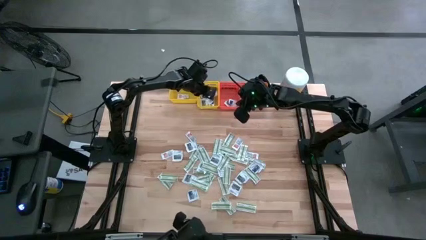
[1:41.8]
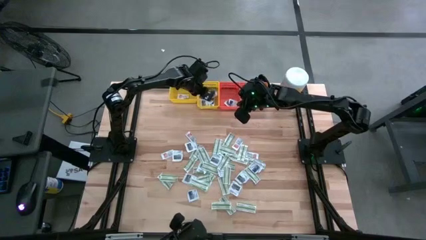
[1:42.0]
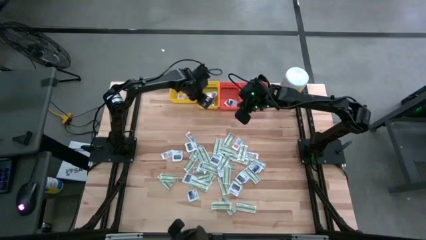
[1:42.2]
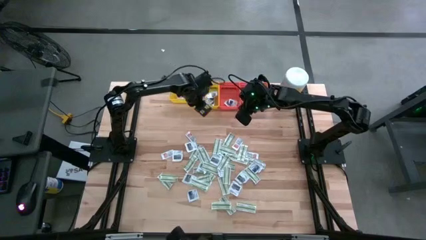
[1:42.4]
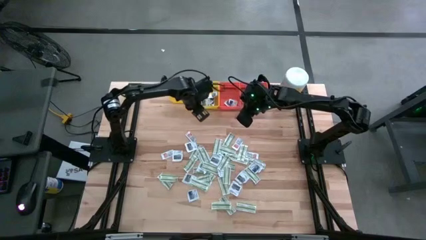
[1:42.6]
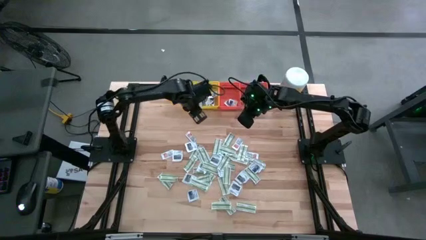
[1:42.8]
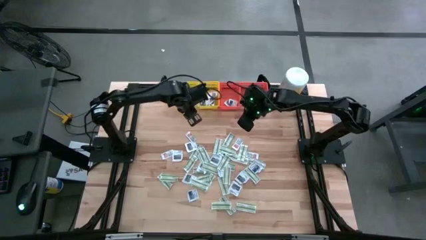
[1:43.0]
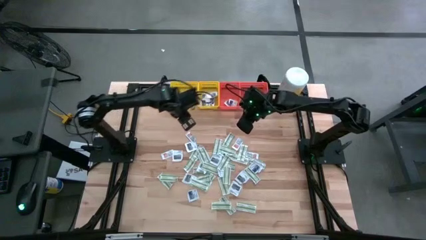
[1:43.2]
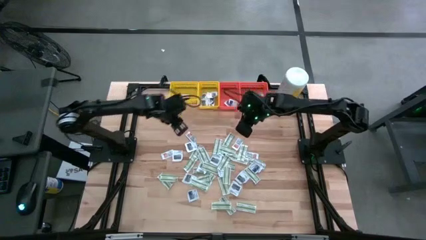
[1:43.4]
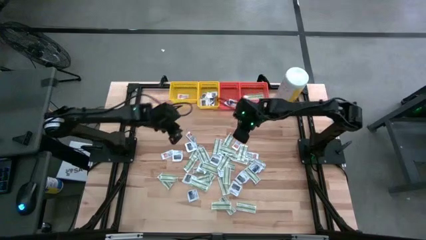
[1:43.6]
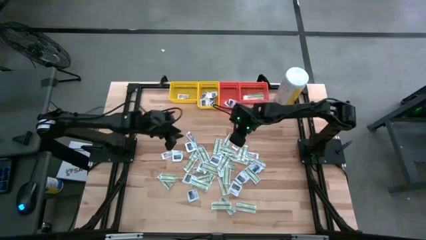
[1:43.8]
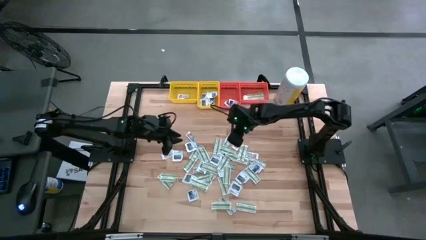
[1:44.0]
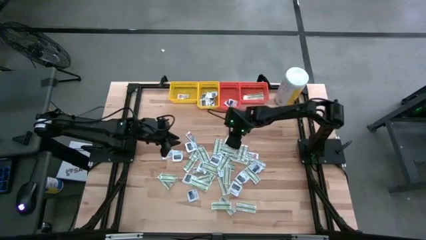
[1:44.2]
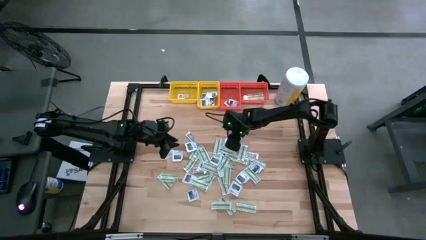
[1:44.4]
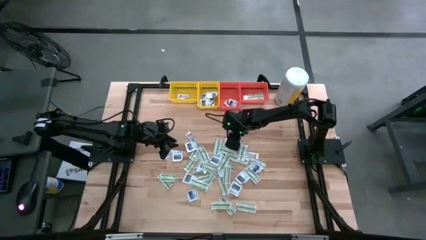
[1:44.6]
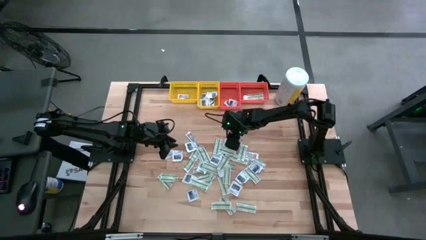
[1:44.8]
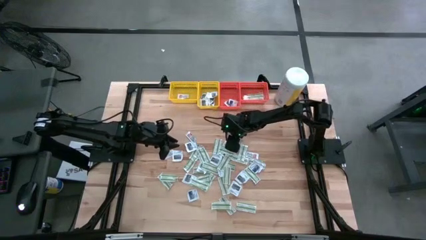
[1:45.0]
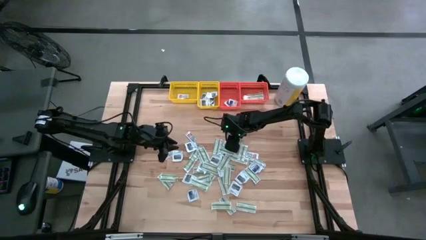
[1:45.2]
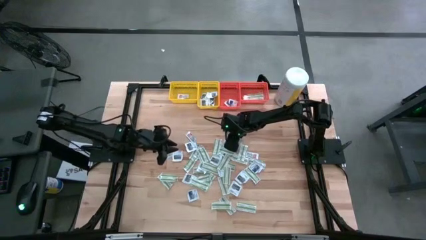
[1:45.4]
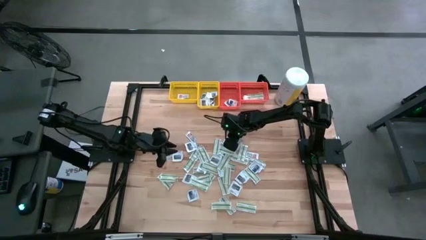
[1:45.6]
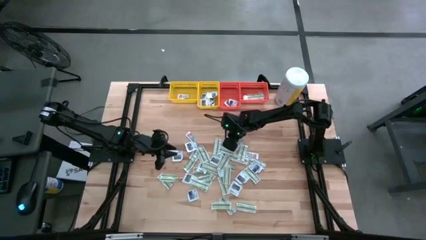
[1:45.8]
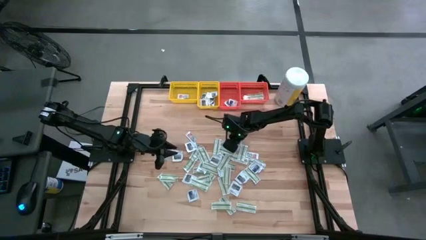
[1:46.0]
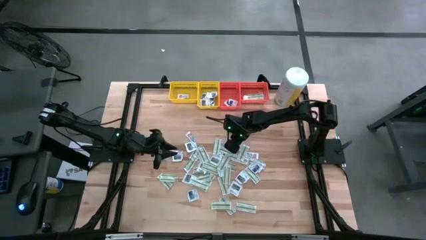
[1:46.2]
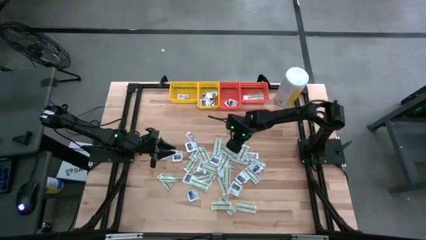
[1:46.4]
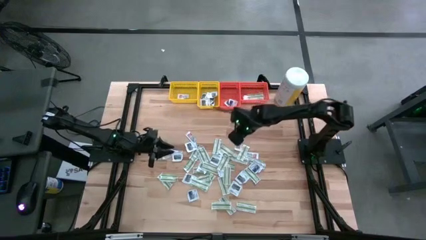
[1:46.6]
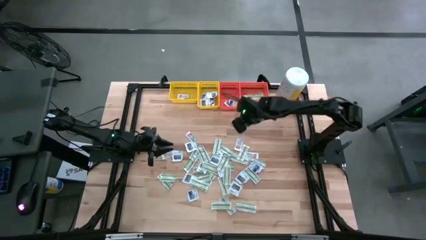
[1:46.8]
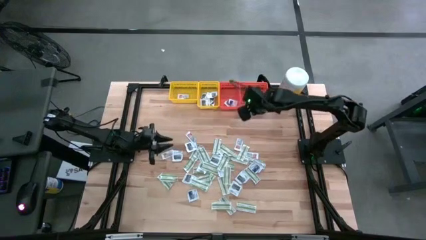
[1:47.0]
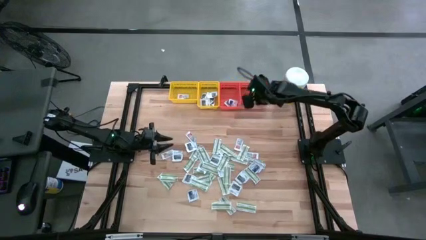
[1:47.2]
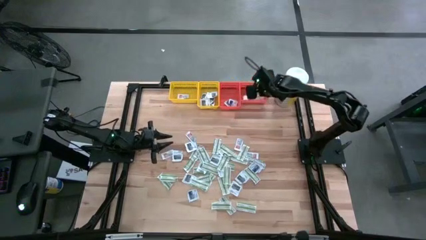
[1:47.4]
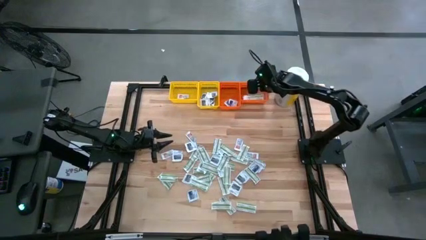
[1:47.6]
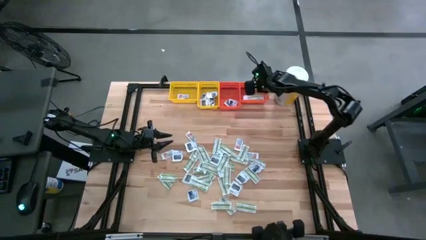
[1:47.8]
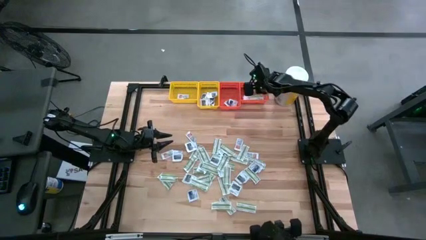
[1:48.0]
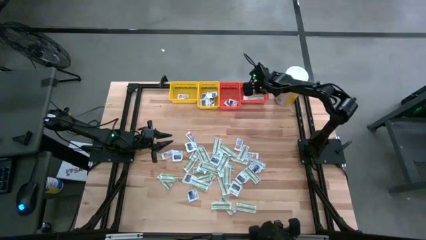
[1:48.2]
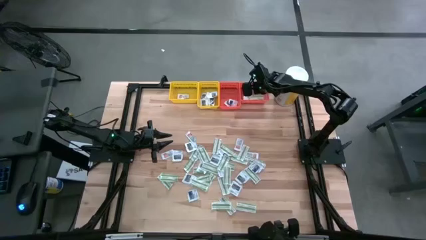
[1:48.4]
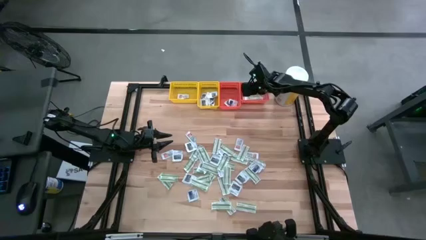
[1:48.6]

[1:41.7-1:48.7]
Task: Pick & Place First Aid Supplies
Put the green pad into the right orange bin

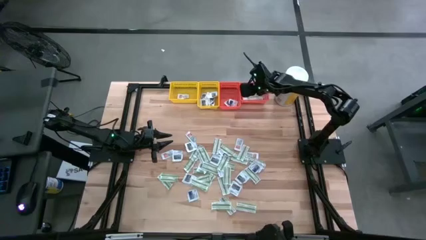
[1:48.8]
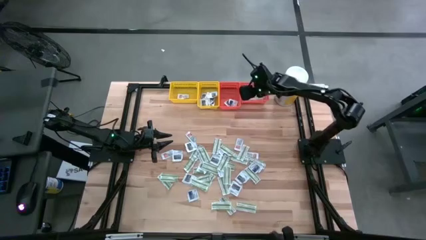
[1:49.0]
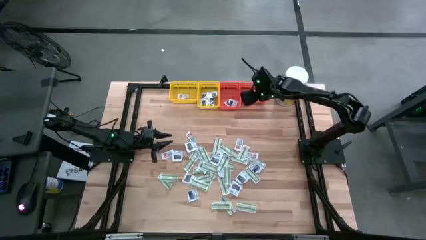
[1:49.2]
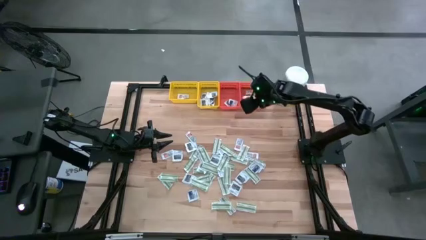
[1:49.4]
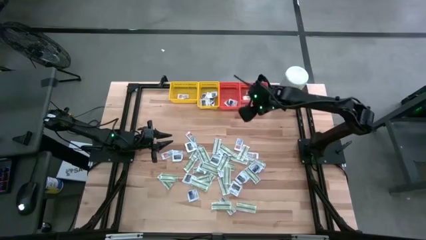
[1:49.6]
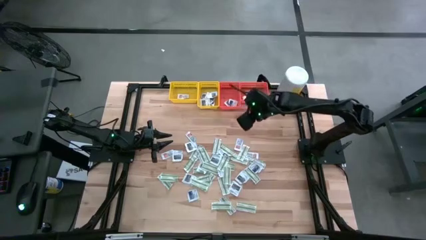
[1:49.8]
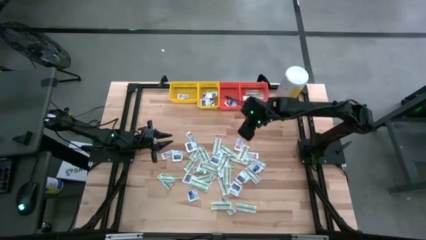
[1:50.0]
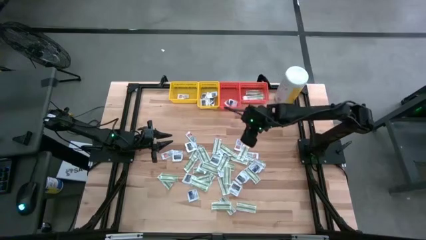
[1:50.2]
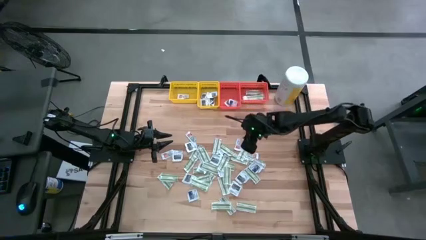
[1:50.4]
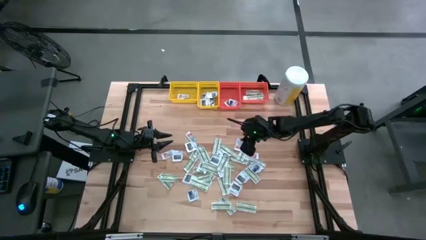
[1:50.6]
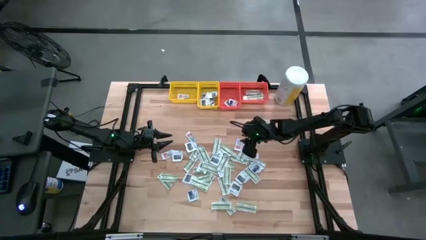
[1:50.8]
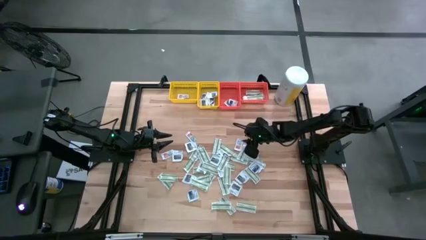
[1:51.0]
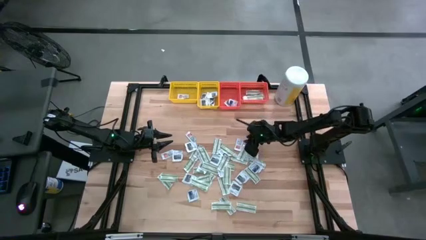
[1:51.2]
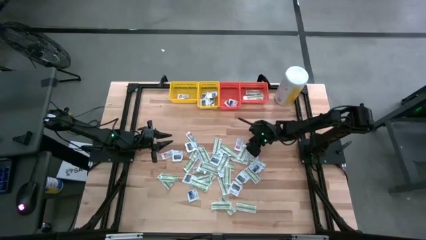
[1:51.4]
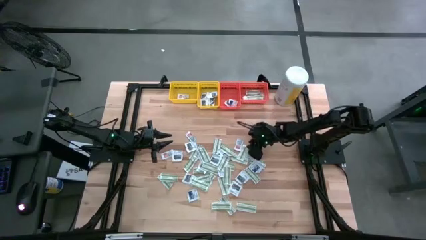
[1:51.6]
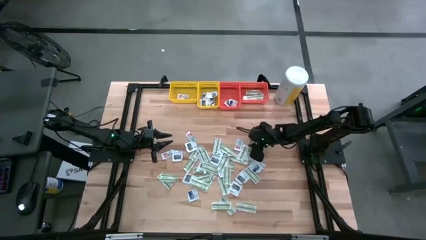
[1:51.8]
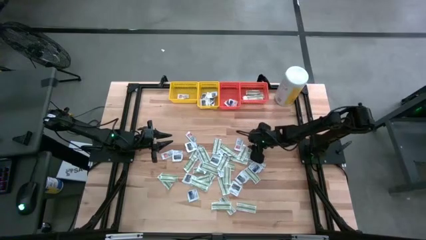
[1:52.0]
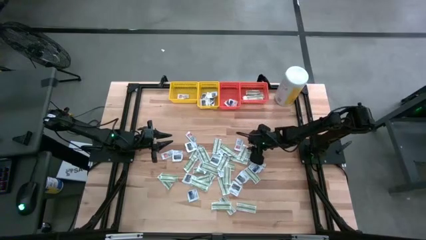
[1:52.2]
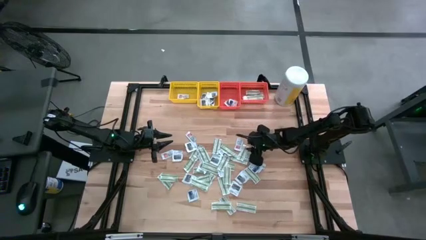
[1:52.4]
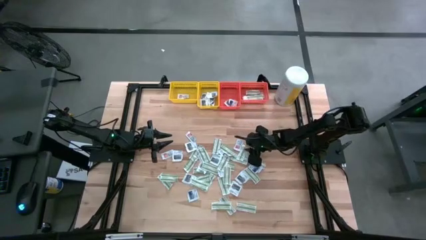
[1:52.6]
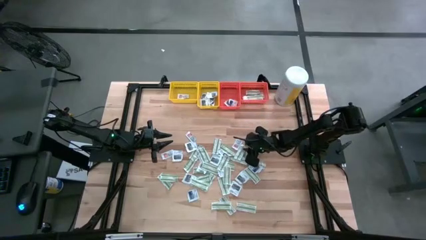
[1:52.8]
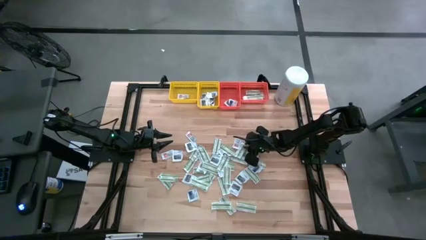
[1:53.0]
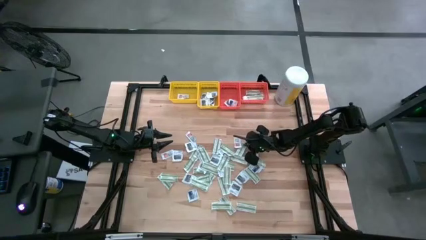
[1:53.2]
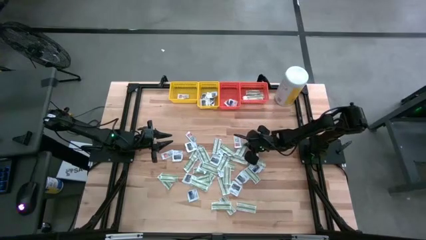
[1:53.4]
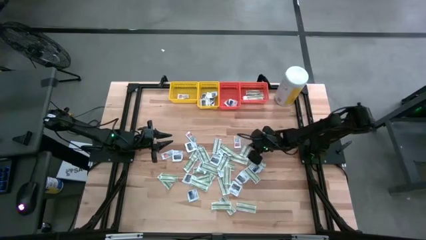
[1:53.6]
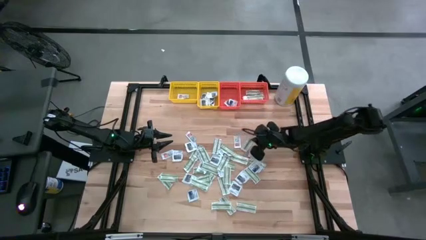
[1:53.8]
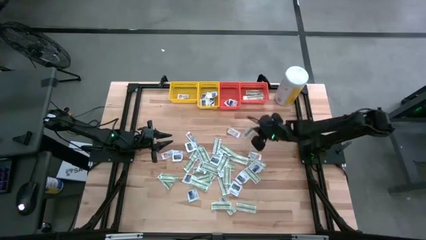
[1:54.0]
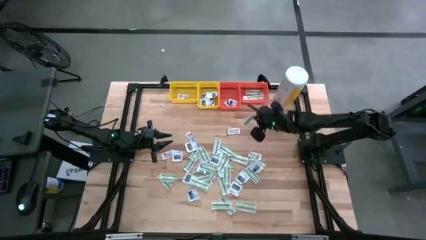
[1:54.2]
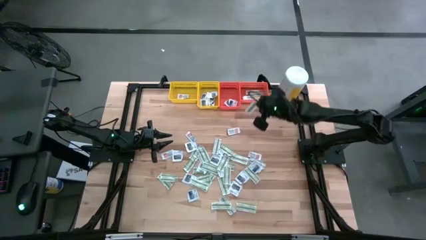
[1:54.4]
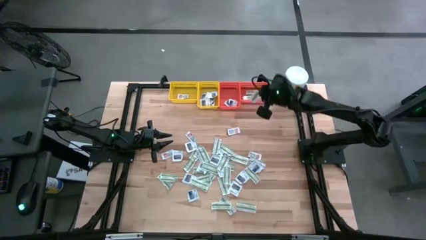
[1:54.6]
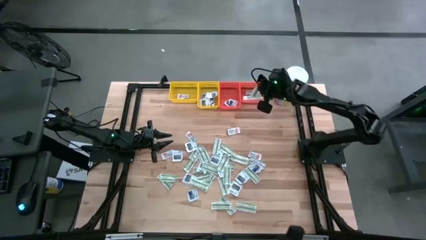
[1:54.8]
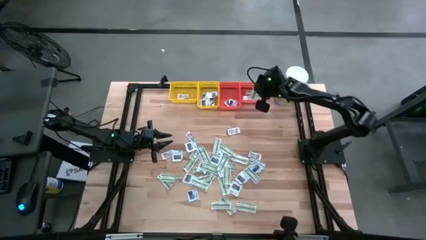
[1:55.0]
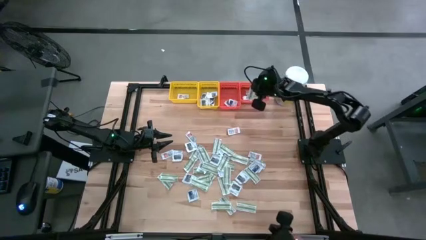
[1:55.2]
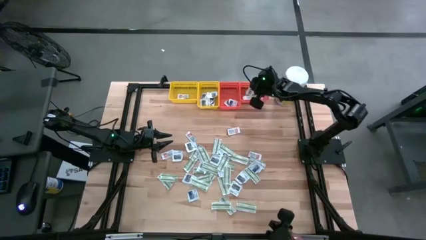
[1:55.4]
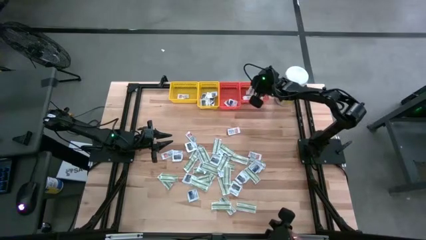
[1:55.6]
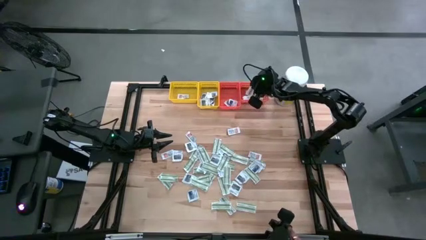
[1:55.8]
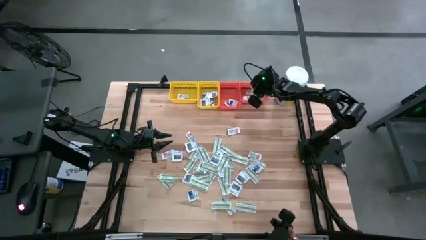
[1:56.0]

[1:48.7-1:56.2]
Put the green pad into the right orange bin

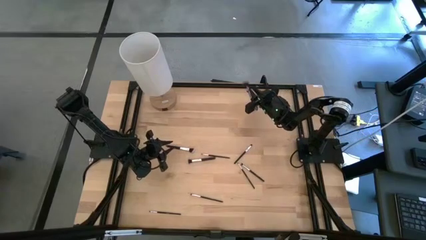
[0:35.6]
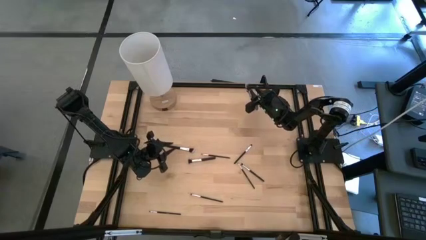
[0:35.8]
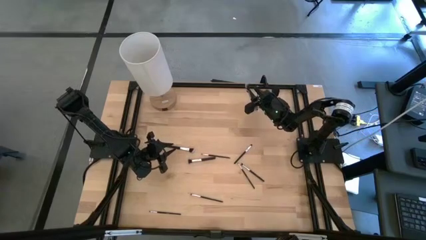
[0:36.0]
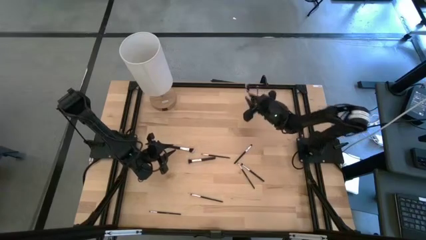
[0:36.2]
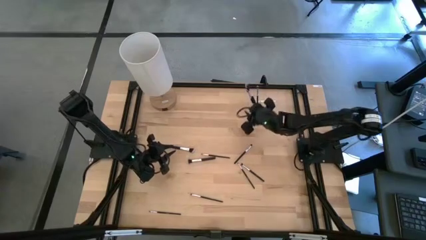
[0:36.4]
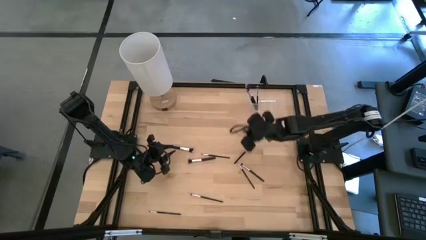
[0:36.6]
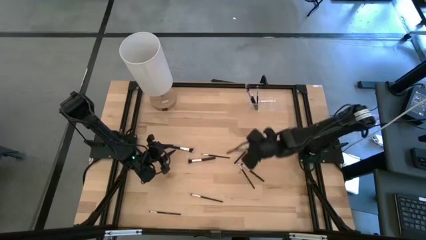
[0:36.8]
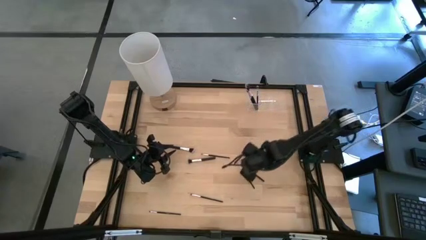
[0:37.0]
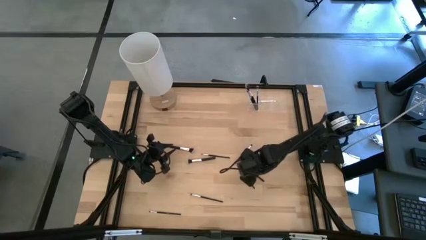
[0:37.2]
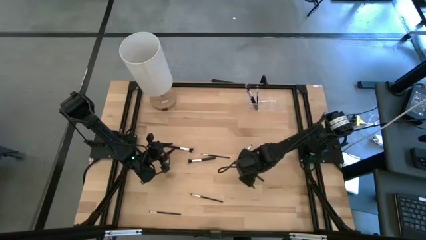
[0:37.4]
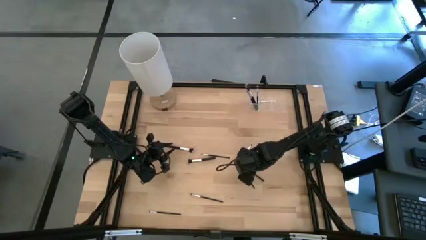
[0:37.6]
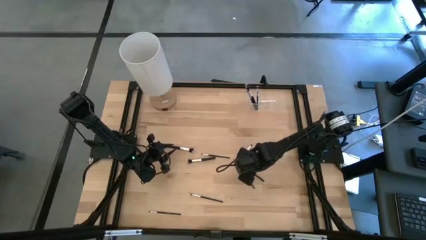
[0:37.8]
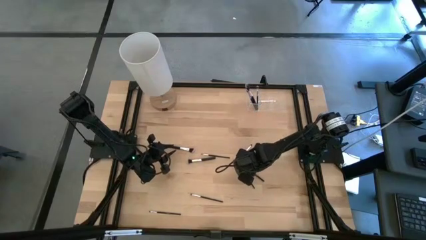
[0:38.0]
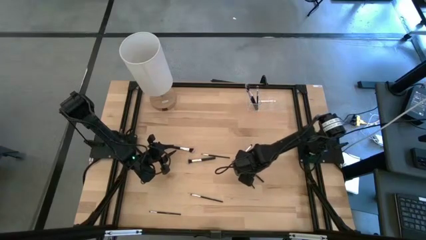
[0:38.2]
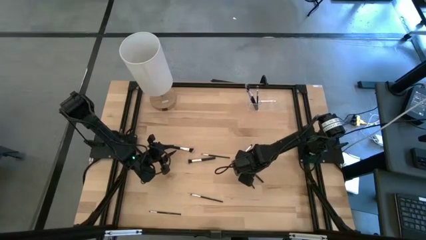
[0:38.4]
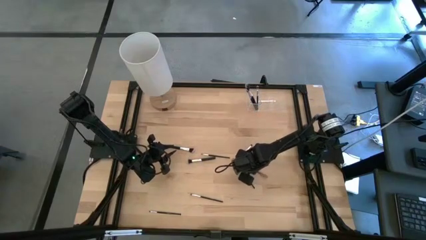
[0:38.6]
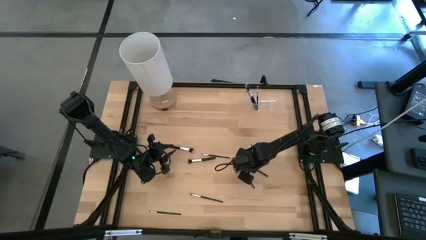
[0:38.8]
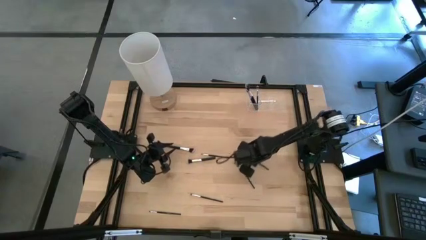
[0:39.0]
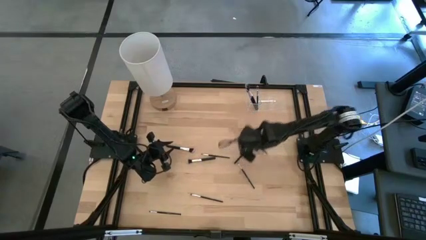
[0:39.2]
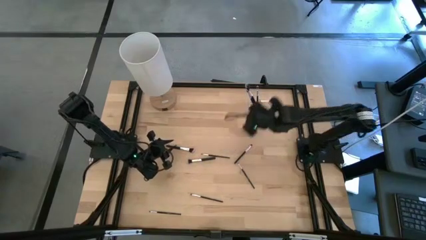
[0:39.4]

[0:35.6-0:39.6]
Task: Put items in baskets/containers
Put the eyeshadow brush into the middle of the transparent organizer
